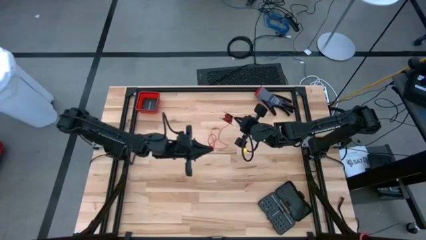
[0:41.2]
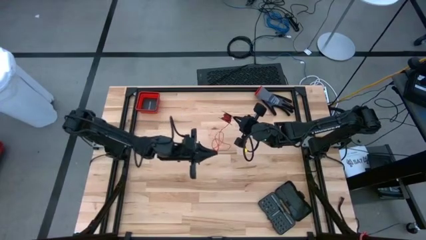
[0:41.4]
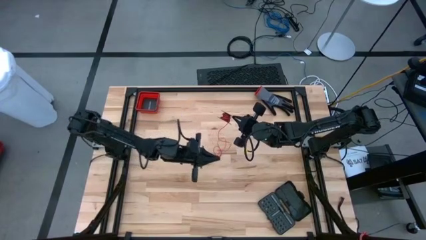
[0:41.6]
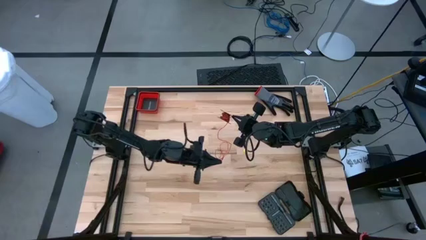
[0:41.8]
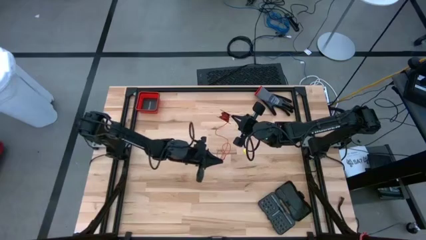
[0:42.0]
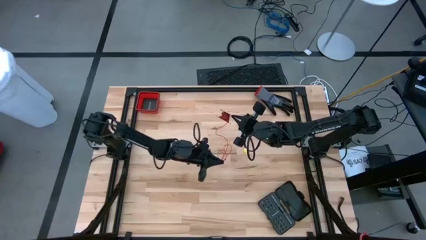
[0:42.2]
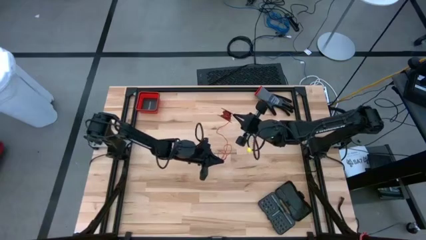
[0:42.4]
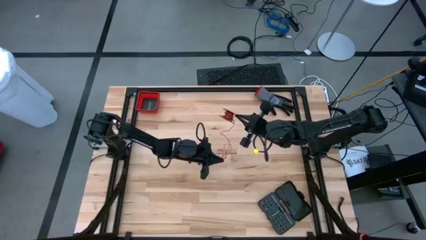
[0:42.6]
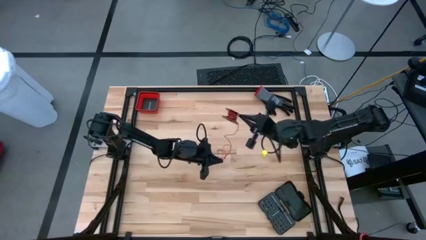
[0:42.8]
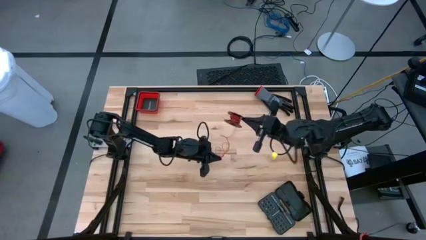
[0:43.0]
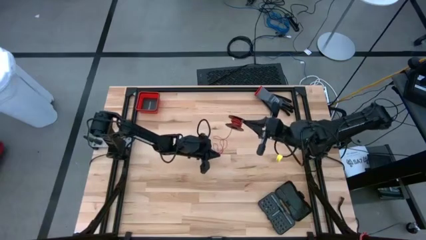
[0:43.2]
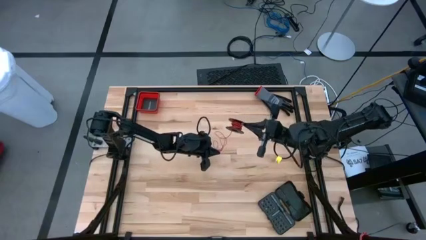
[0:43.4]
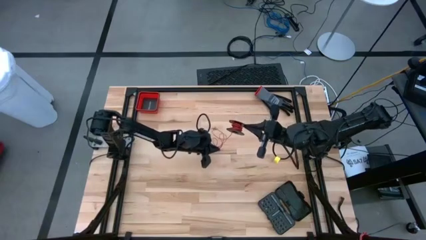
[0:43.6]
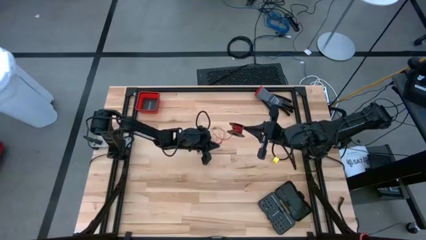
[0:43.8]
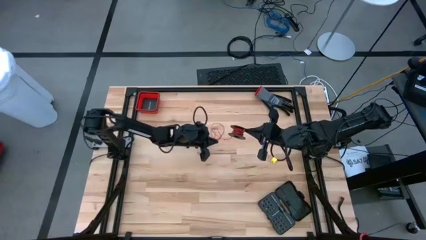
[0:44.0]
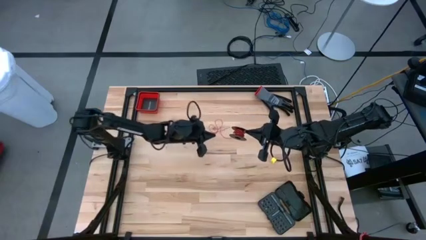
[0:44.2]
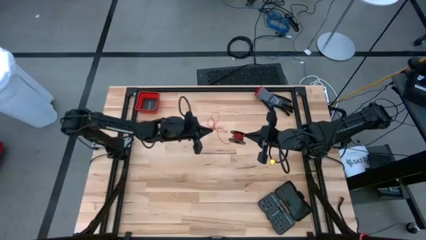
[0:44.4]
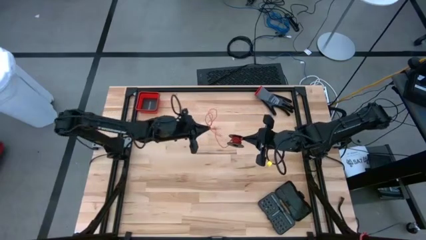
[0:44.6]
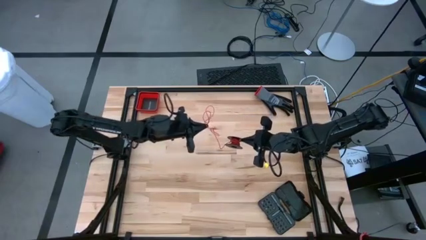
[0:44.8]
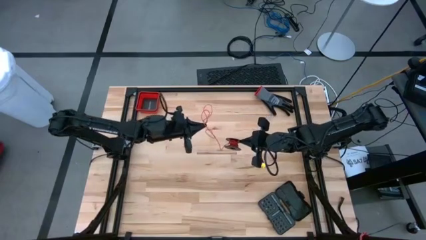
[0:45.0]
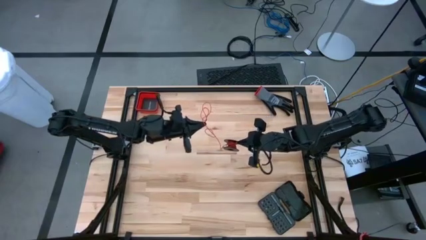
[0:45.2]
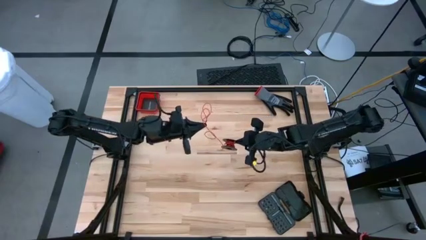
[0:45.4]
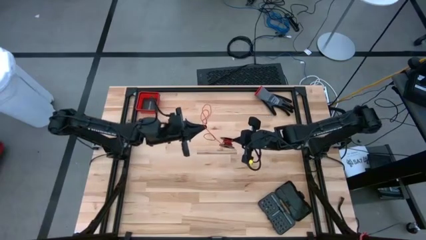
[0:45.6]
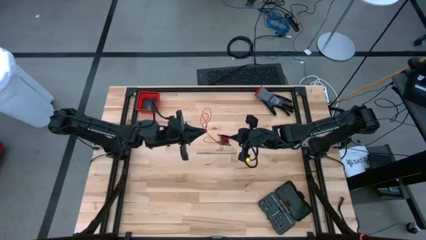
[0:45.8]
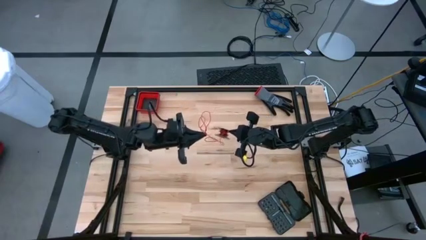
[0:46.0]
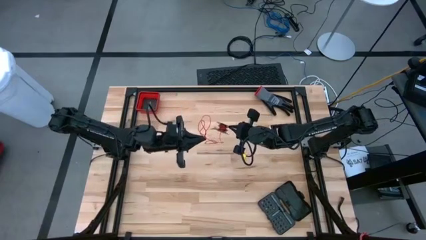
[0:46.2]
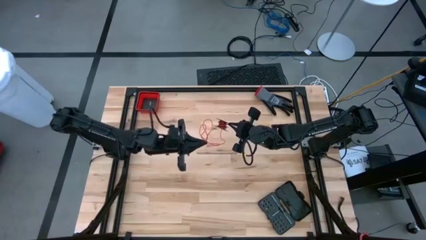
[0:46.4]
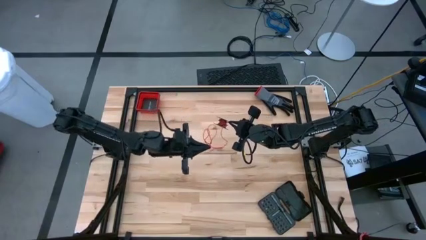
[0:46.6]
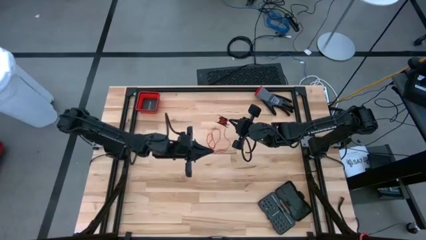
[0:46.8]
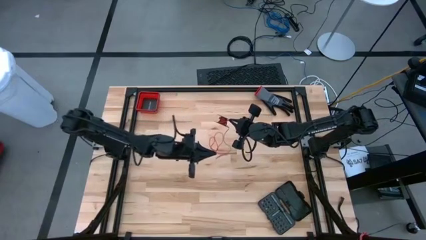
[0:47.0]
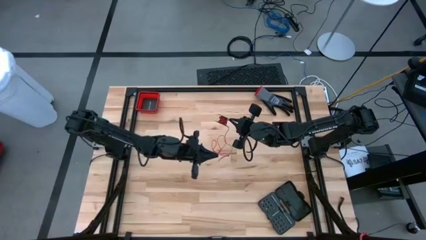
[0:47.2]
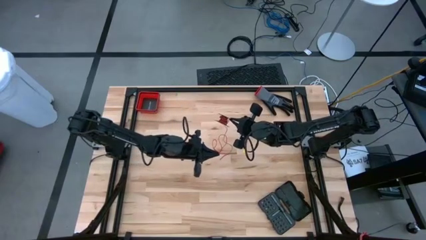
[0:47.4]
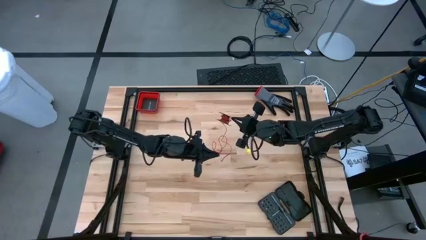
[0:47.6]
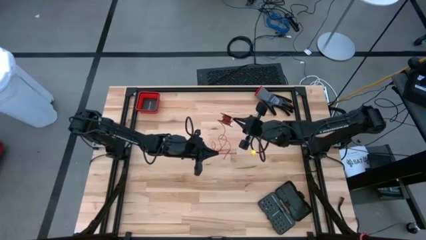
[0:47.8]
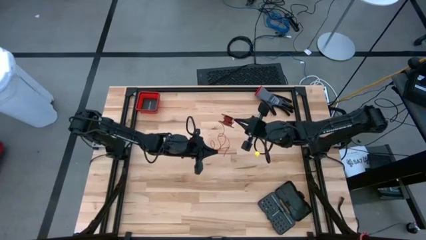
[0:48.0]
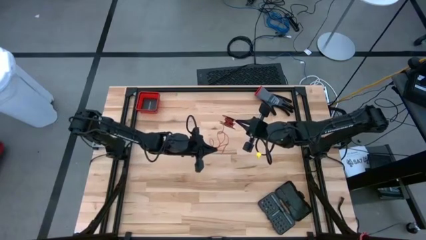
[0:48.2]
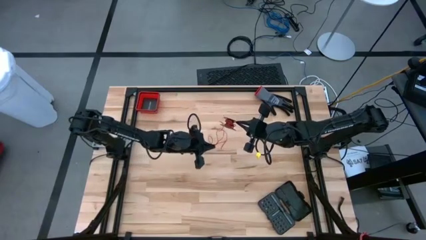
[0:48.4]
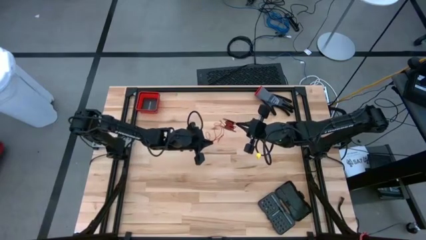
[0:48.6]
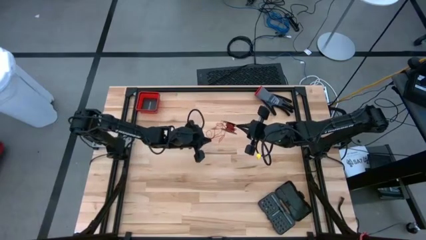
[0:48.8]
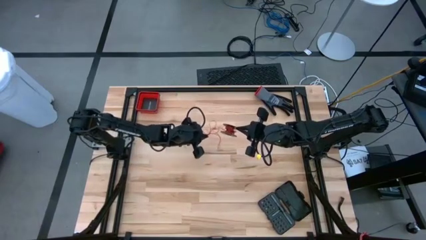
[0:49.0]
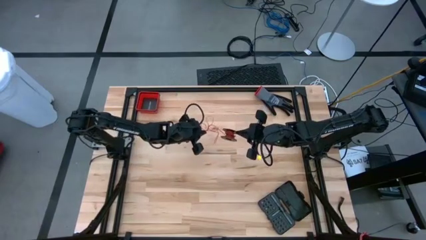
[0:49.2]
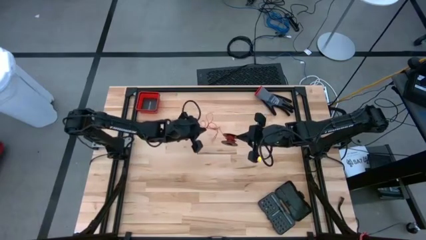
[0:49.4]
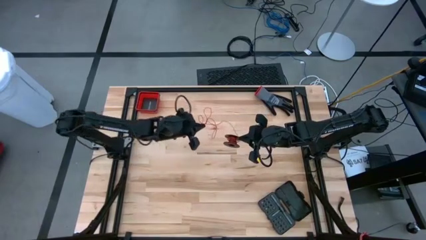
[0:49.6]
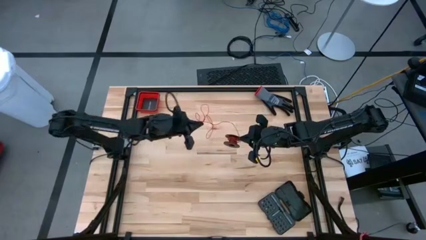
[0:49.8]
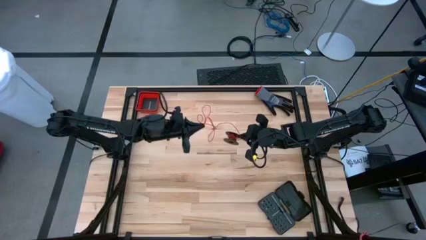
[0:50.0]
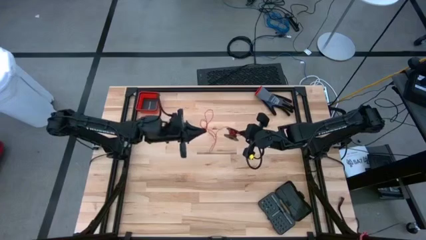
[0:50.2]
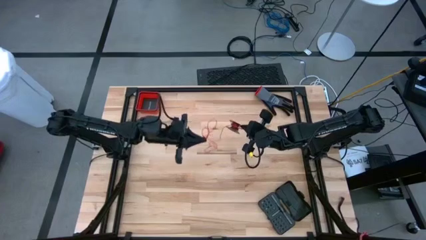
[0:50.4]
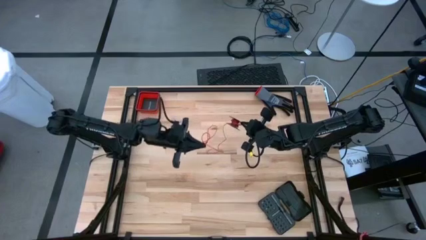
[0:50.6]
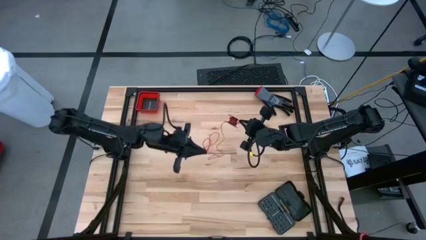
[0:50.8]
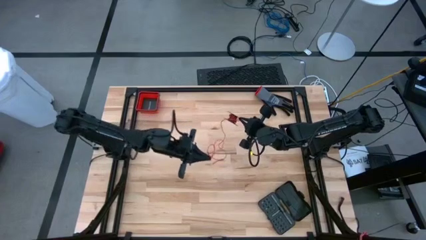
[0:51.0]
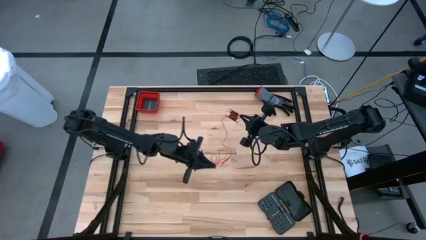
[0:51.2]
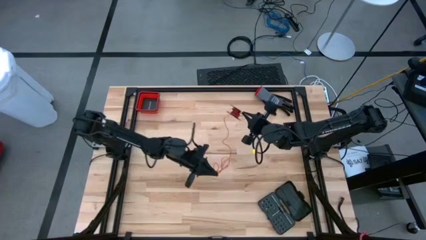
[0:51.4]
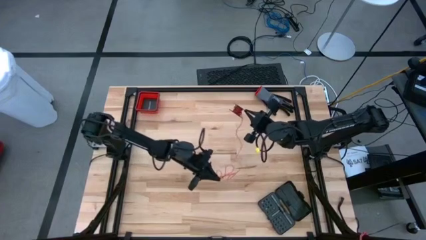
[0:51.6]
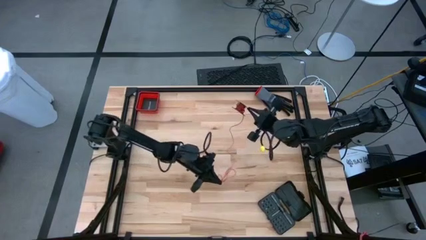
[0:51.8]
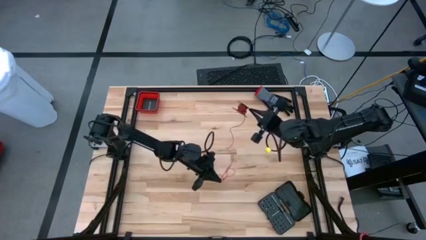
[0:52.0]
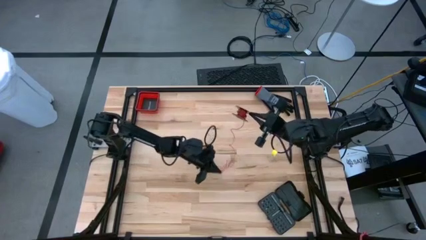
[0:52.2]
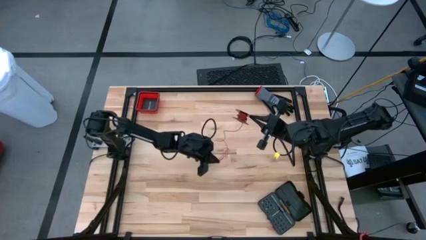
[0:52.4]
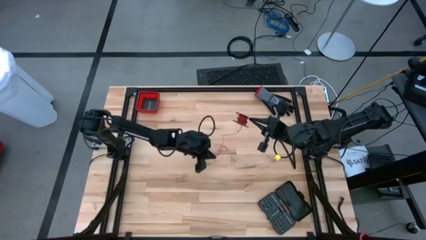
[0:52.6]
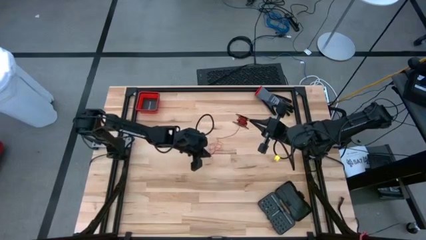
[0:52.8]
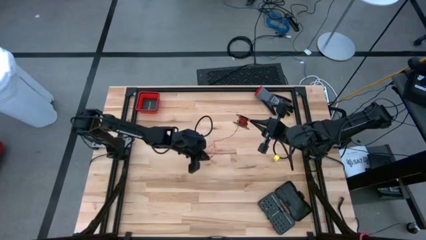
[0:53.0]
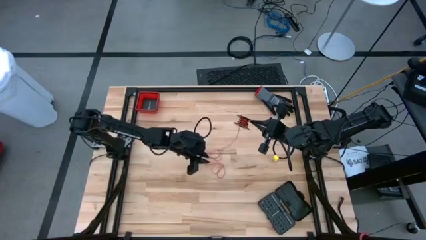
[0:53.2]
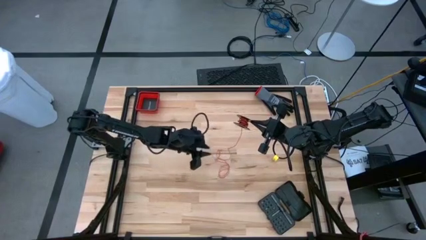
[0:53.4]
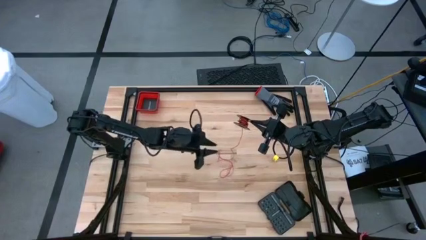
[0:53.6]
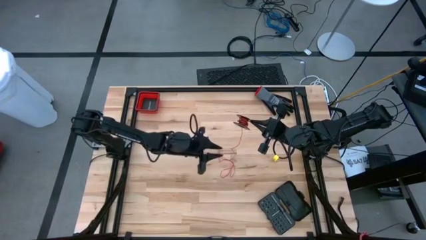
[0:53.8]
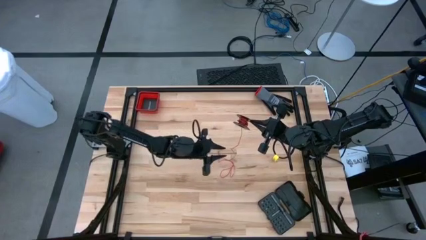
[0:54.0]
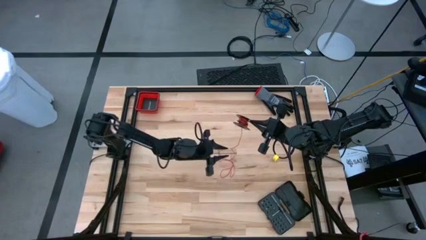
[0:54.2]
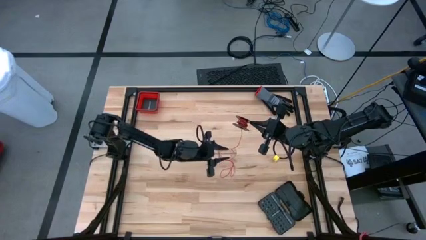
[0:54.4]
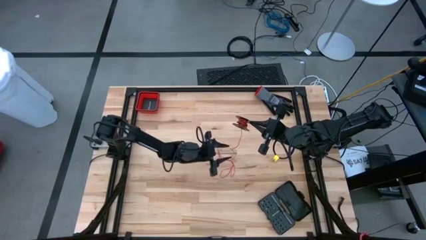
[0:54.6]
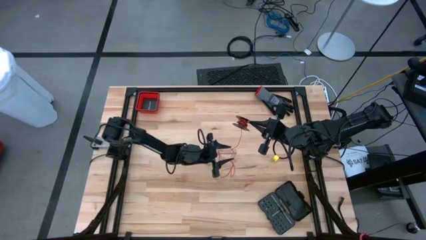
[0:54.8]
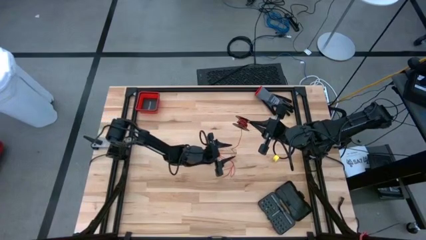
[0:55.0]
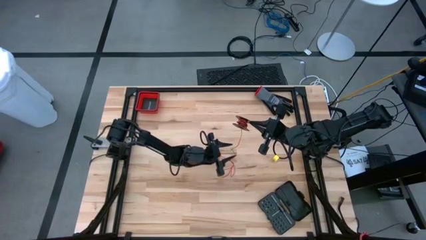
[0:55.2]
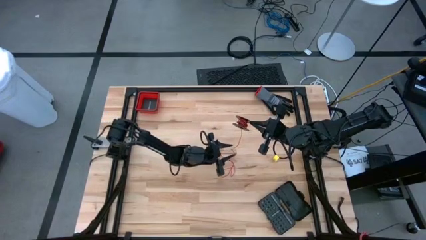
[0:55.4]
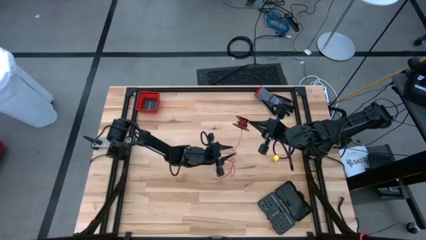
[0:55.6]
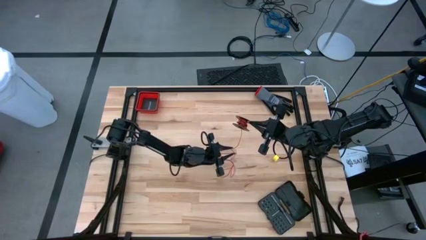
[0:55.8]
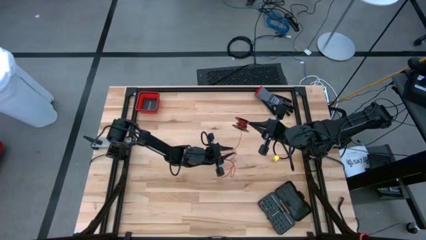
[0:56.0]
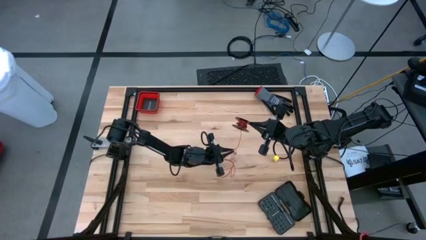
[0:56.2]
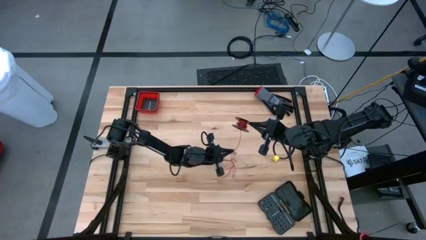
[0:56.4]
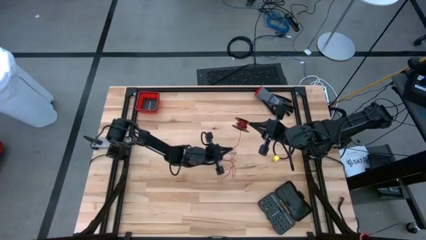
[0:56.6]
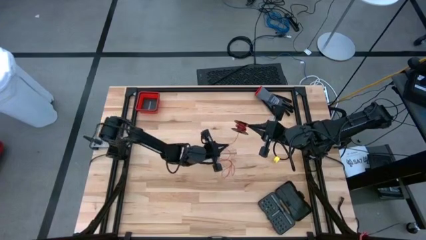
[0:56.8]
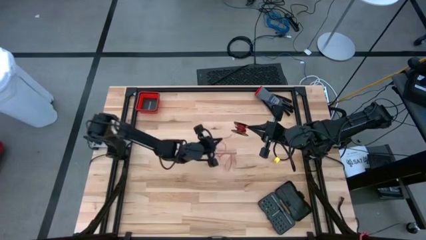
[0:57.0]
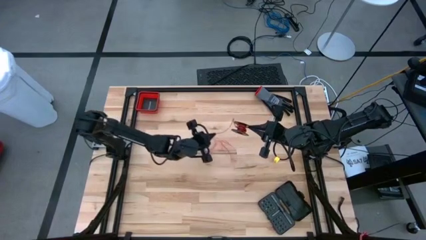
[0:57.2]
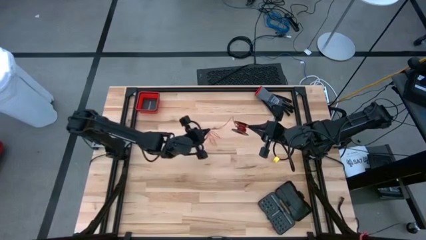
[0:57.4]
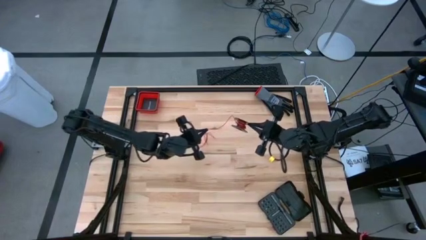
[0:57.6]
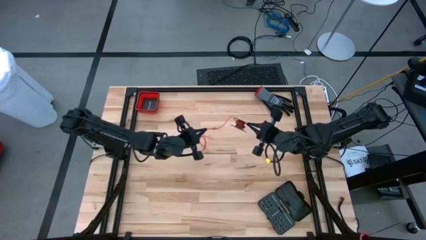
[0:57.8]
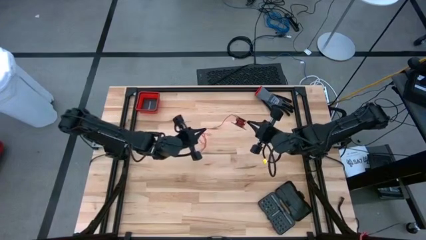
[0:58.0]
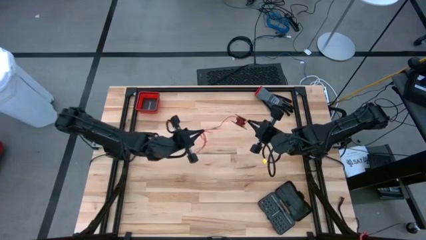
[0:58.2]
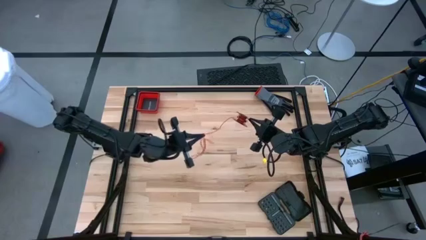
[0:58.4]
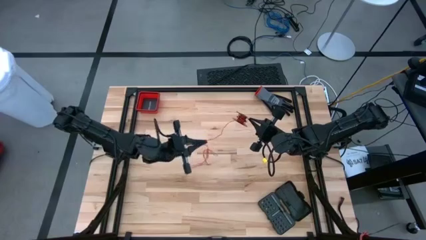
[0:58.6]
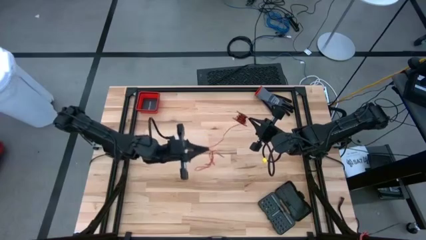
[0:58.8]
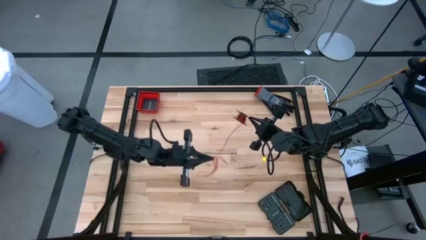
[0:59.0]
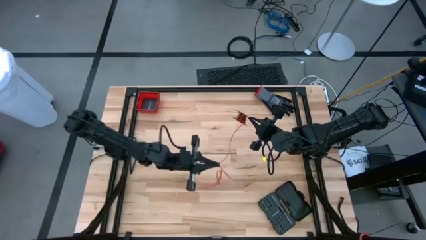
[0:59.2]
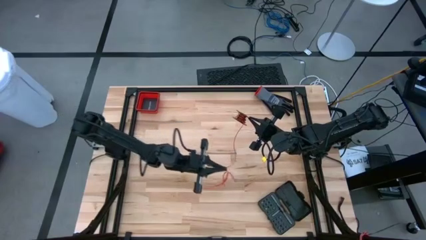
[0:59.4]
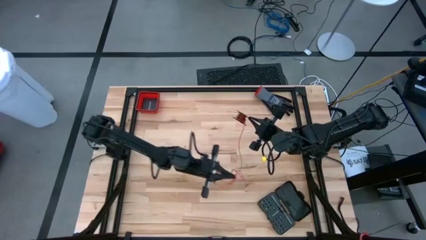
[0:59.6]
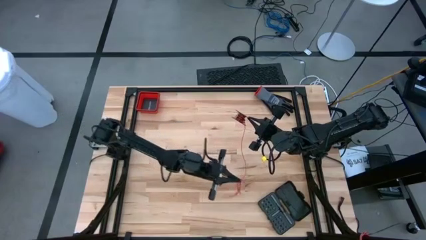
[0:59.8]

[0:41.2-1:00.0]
Task: Coil cords
Uncoil the red wire from the spool
